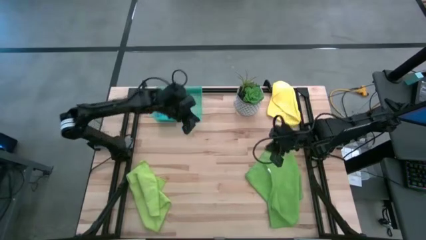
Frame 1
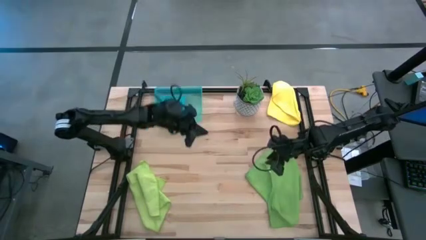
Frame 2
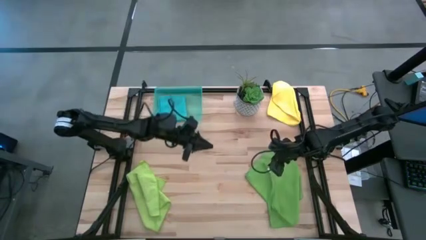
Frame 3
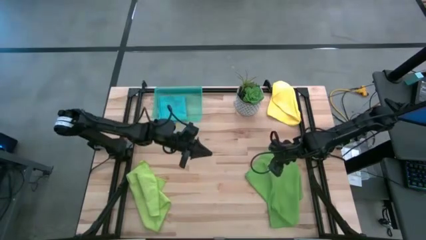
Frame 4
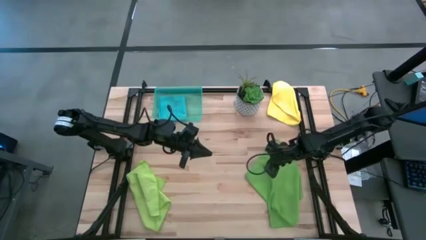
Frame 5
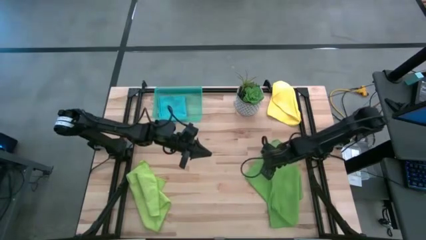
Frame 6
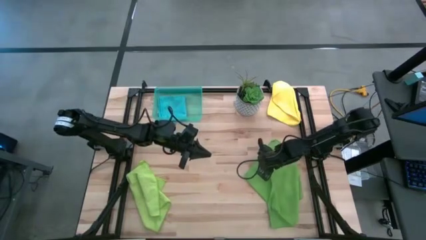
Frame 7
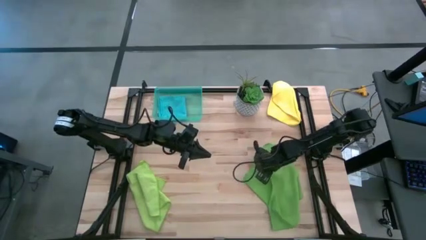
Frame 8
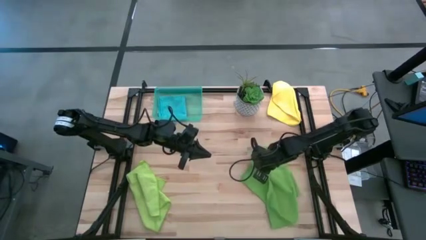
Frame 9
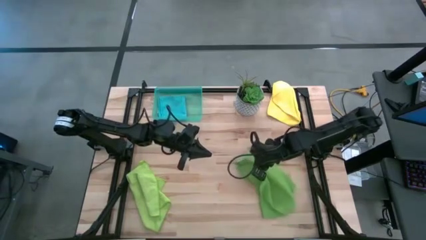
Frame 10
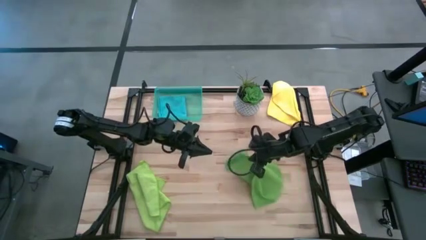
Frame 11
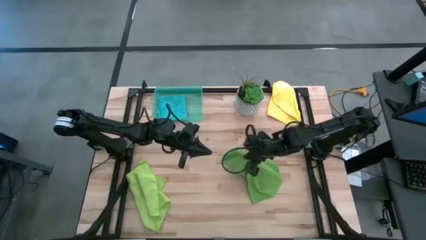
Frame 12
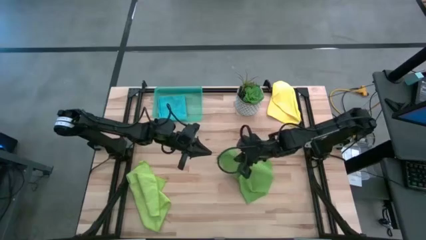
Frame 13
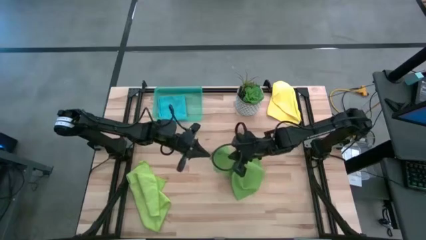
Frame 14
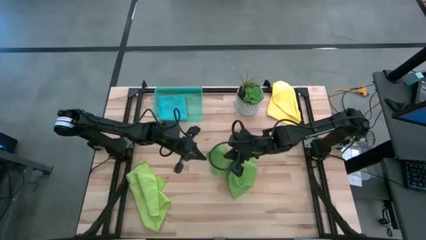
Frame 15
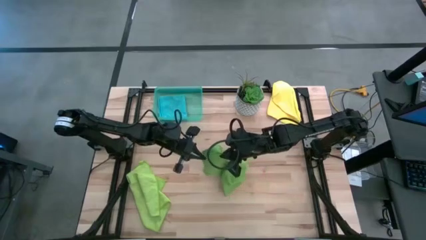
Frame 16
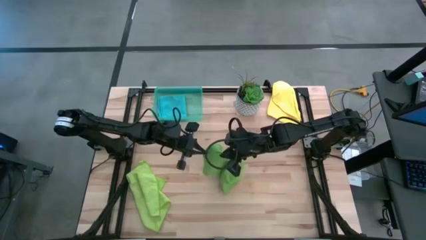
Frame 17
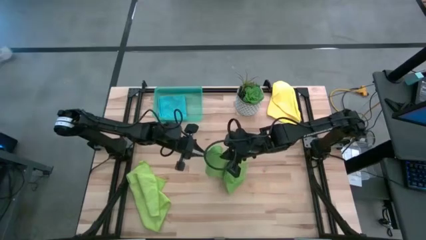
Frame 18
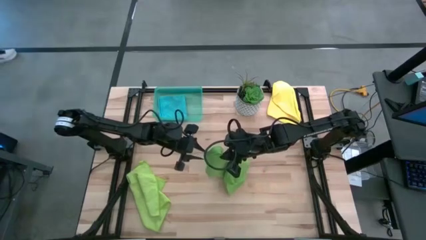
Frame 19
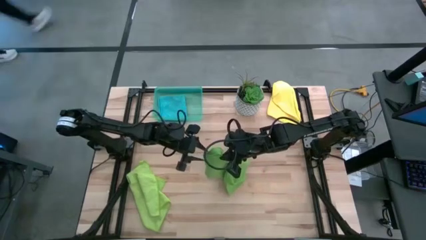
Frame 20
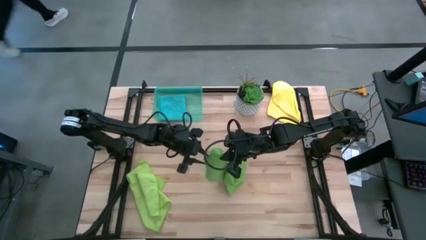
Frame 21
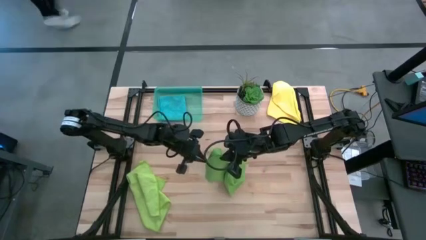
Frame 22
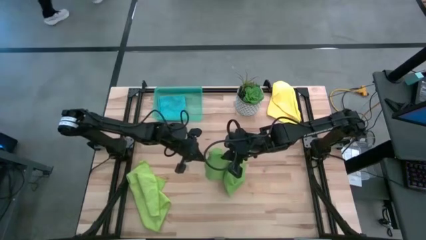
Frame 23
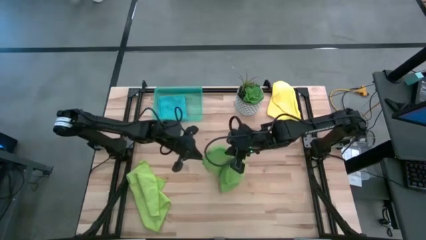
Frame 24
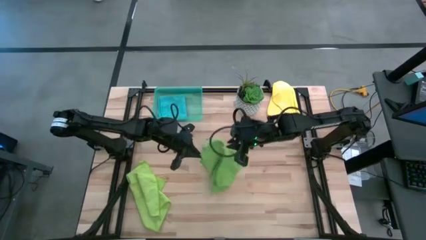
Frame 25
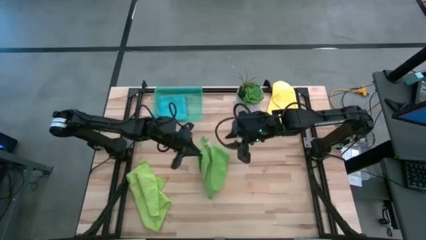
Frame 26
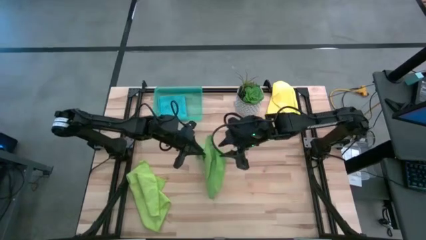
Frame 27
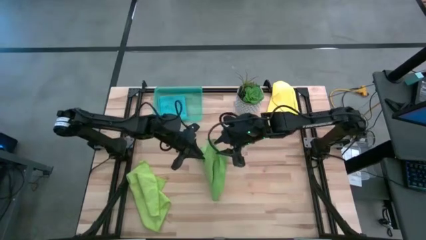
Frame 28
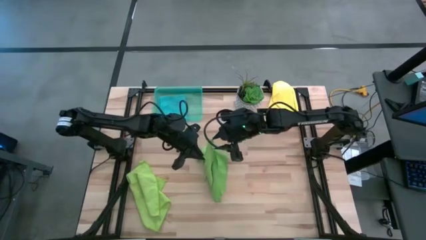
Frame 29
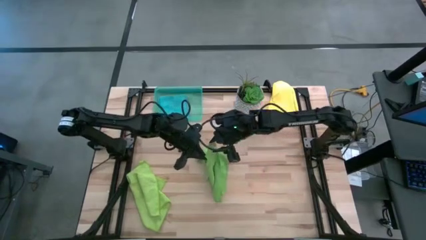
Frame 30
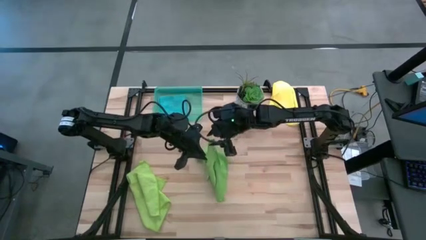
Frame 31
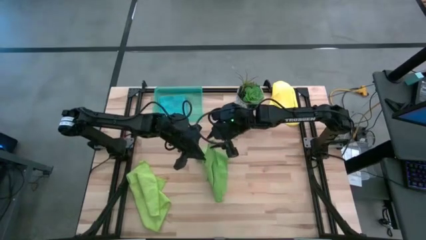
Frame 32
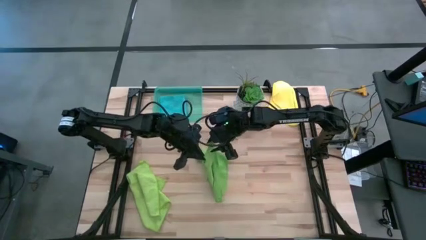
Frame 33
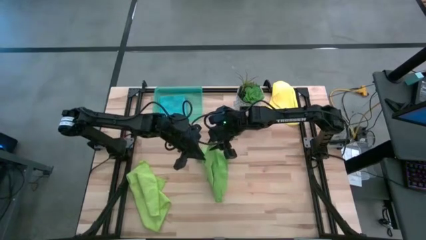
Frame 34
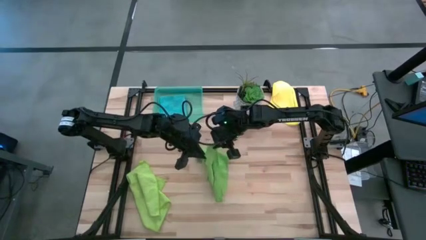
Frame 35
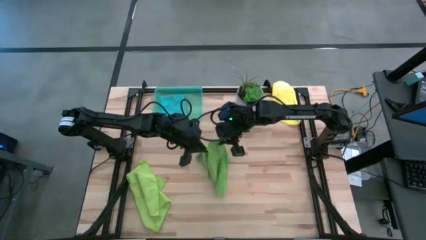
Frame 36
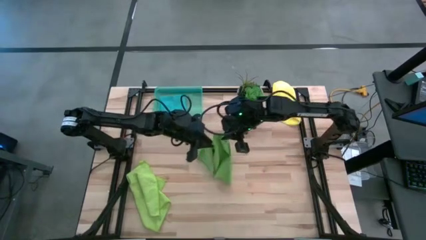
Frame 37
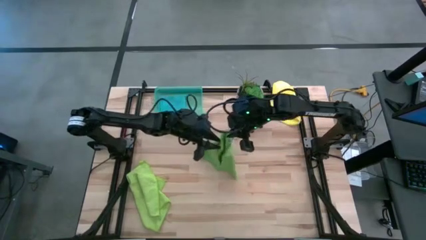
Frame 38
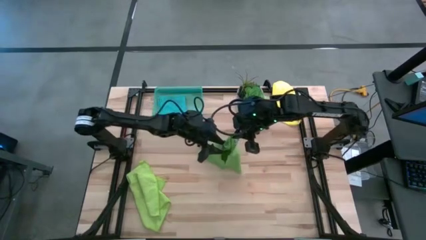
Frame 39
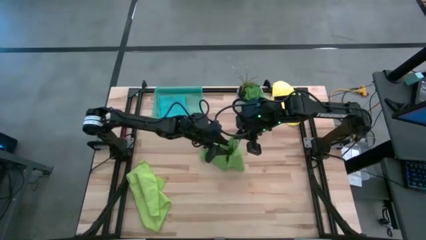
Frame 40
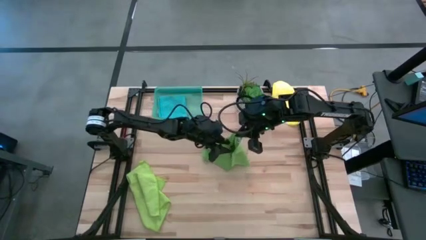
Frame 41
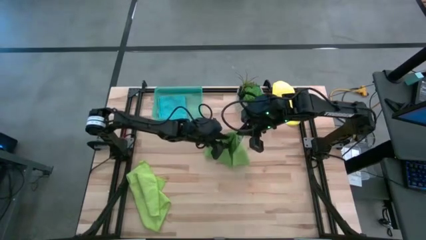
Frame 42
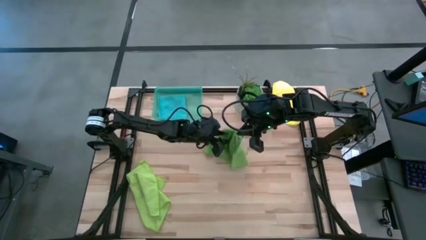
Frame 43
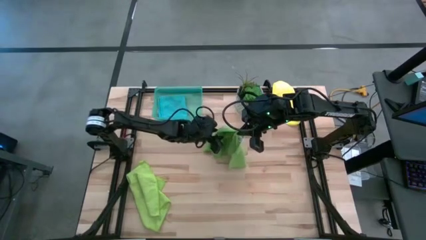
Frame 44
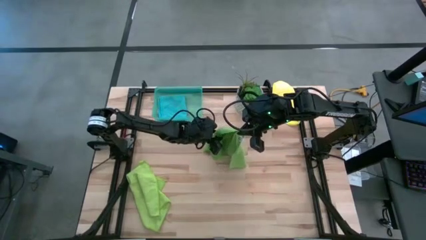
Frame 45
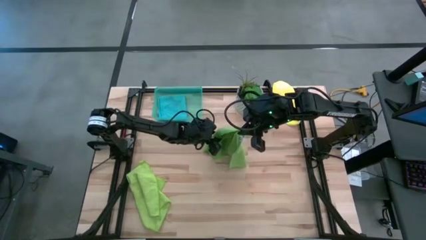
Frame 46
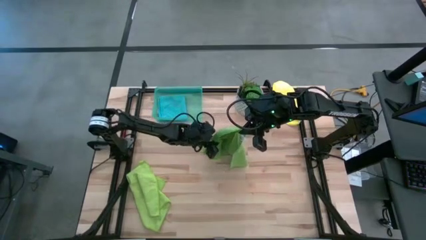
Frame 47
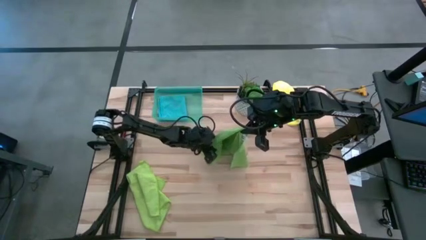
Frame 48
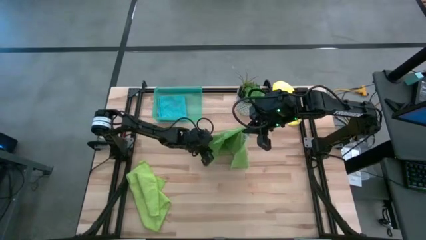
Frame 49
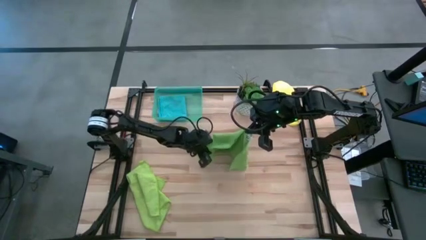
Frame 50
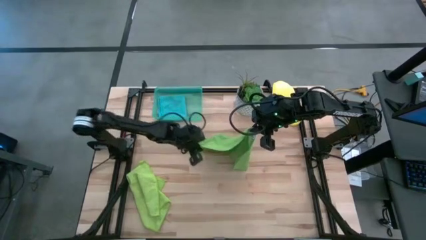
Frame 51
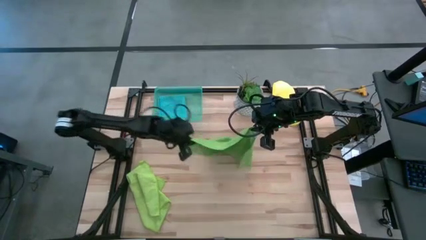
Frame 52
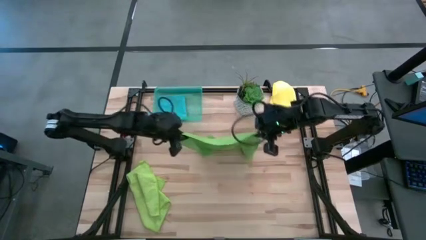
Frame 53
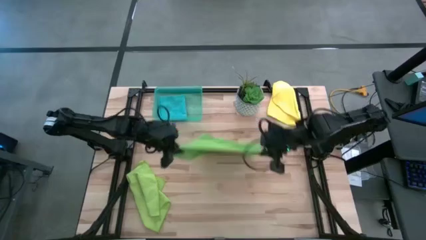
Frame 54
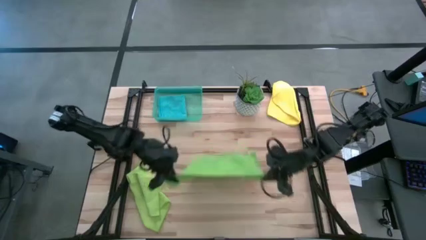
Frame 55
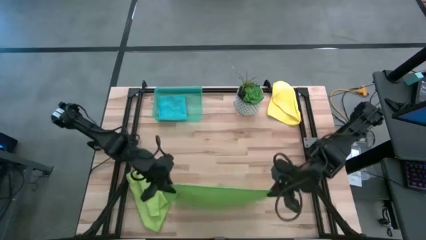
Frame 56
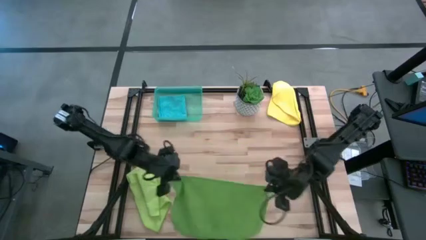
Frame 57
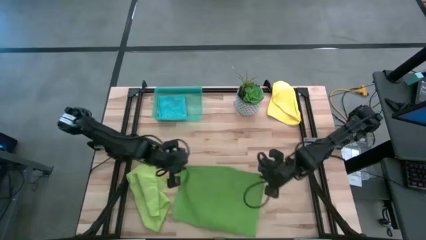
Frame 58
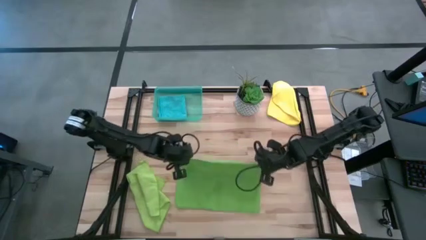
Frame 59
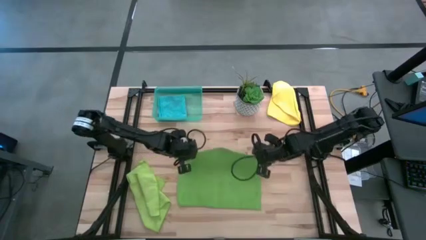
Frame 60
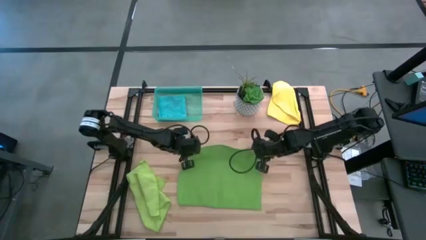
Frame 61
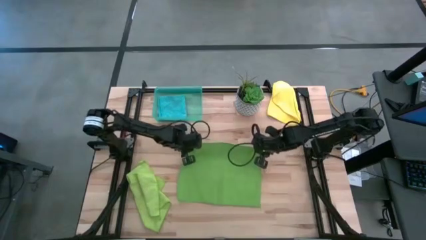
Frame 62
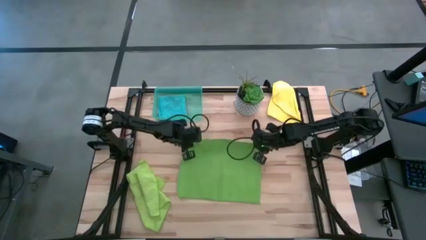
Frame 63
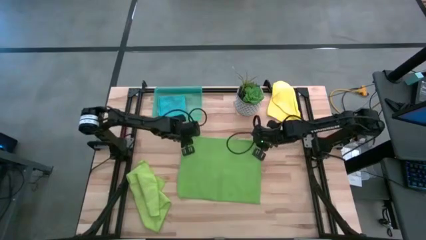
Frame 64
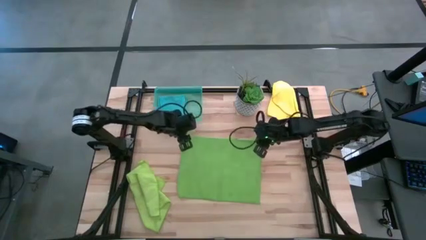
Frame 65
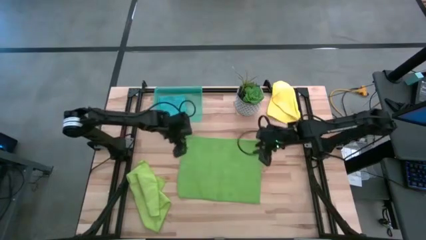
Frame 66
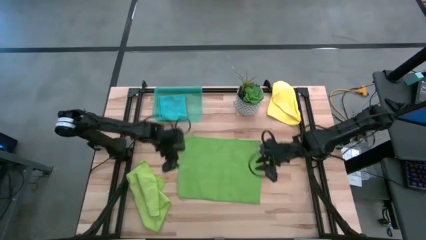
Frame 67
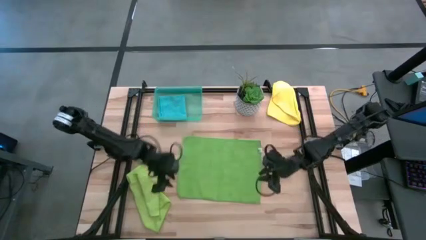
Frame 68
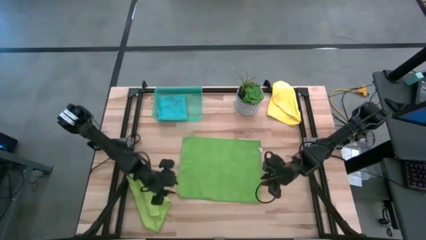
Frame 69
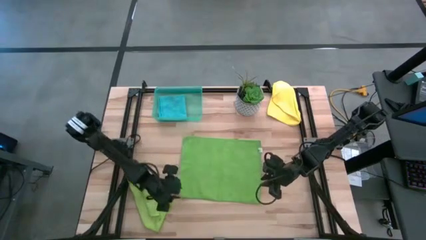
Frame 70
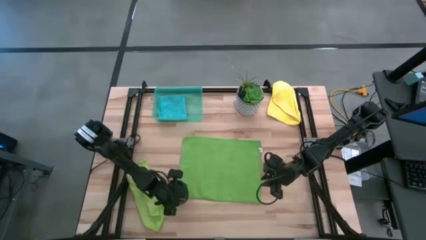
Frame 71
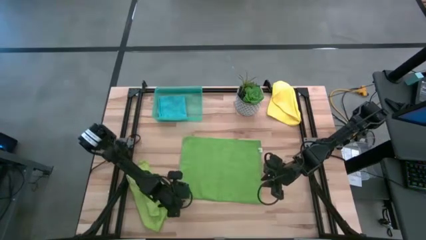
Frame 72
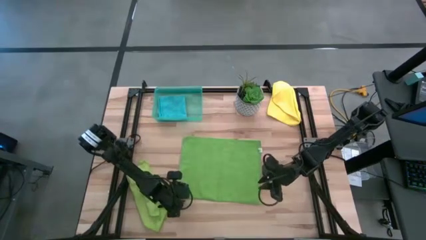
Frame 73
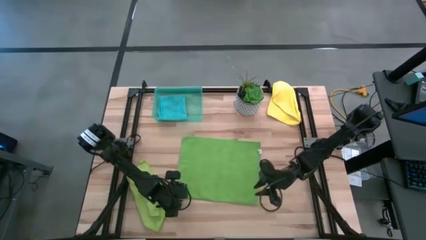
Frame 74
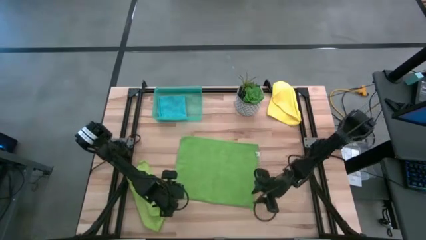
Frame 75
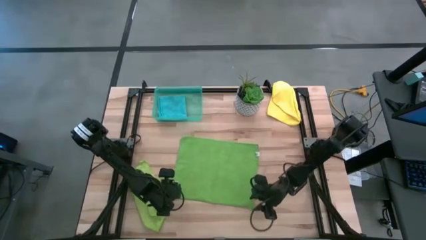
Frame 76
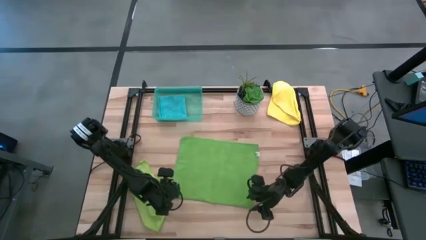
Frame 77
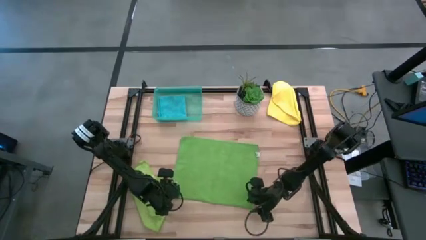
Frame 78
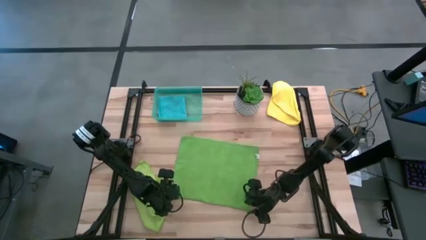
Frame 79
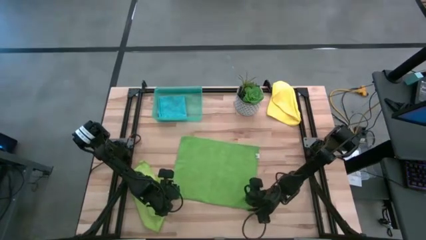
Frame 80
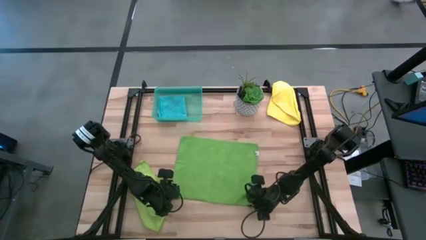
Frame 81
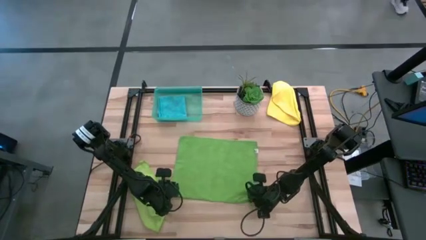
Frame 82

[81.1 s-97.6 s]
Task: Fold microfiber towels
Fold the green microfiber cloth

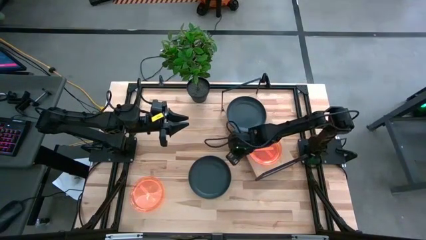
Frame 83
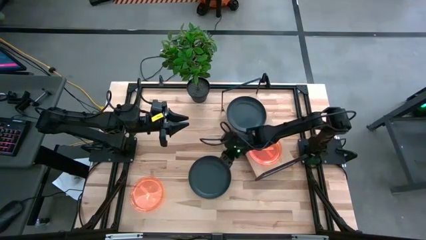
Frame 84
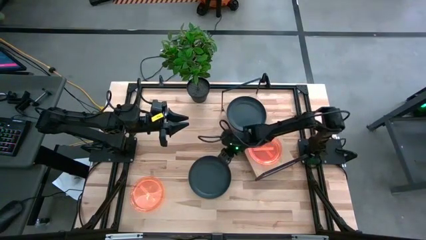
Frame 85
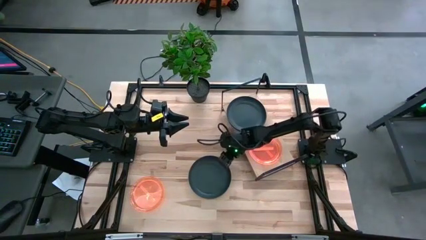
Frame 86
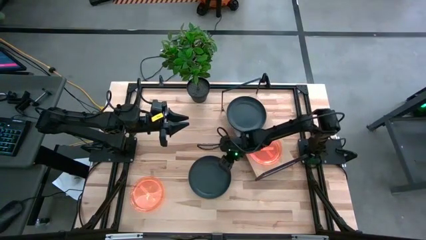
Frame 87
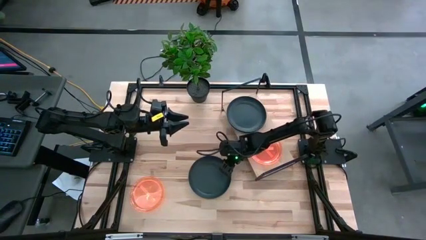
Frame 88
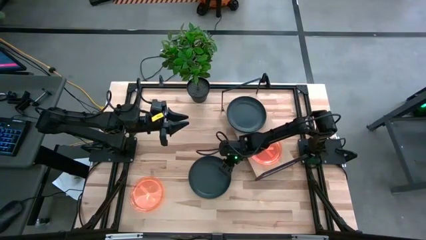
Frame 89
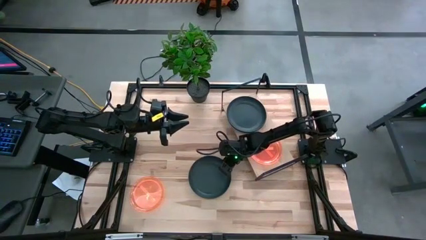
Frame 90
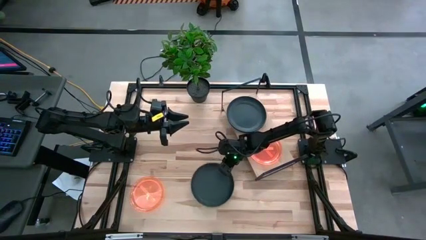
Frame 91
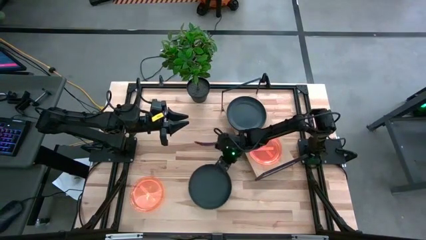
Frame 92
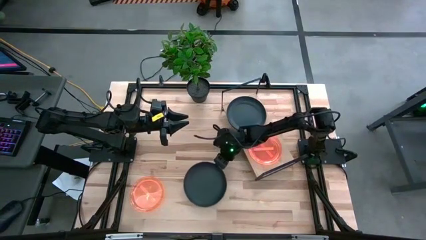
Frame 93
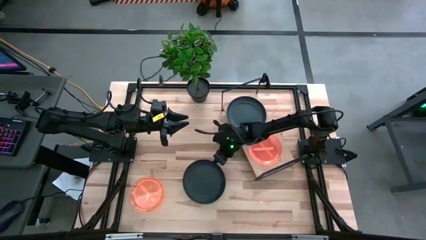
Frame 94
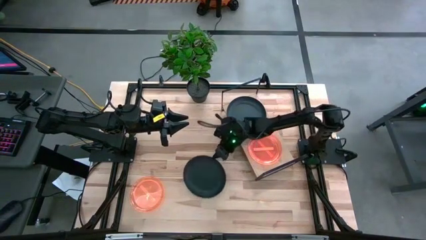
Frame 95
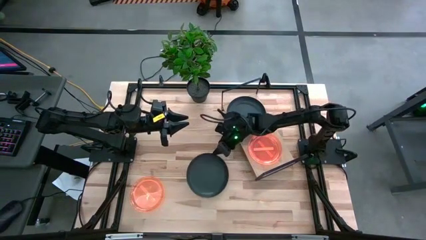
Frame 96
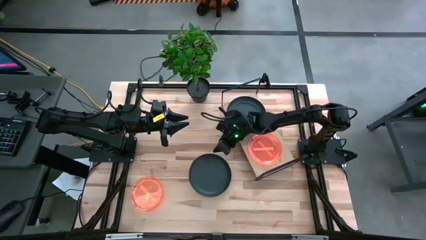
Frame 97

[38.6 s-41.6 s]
Task: Place and stack plates onto a shelf
Stack the black plate on top of the stacked black plates on the shelf
